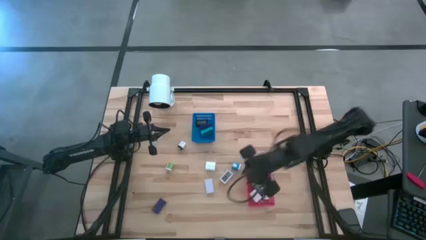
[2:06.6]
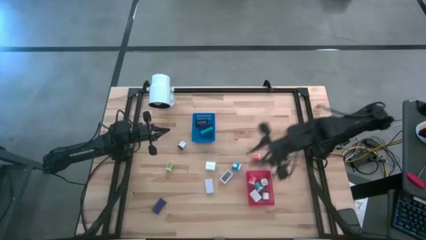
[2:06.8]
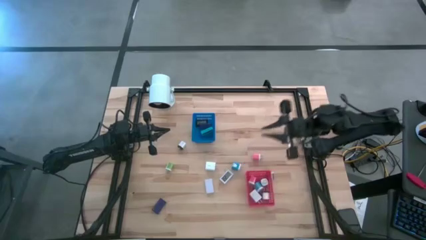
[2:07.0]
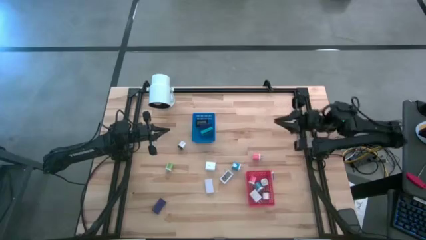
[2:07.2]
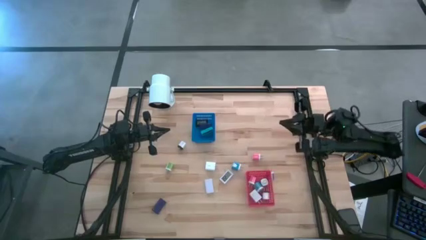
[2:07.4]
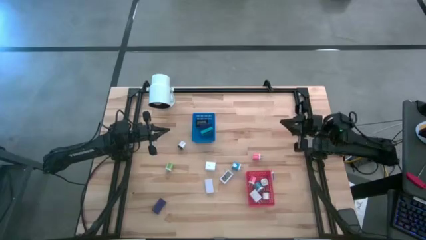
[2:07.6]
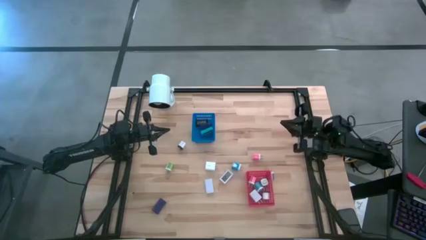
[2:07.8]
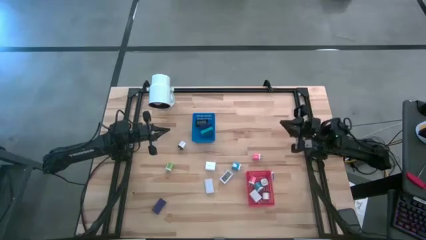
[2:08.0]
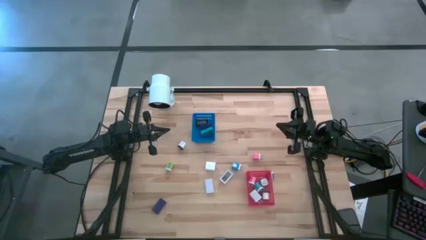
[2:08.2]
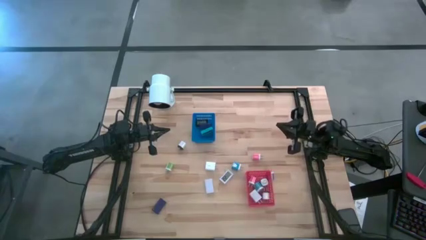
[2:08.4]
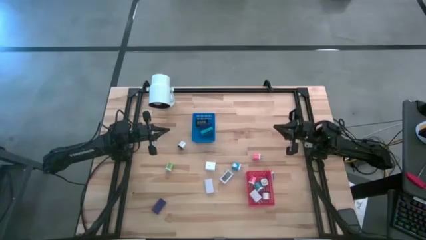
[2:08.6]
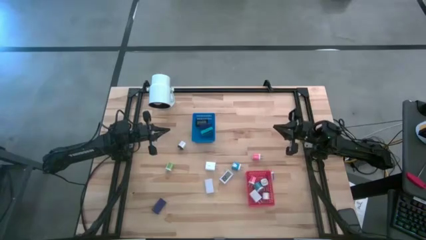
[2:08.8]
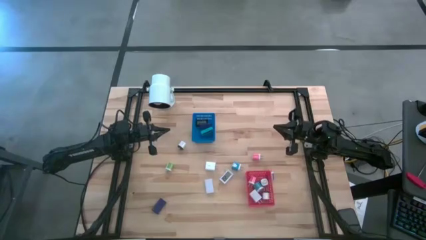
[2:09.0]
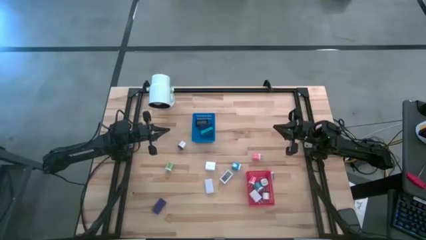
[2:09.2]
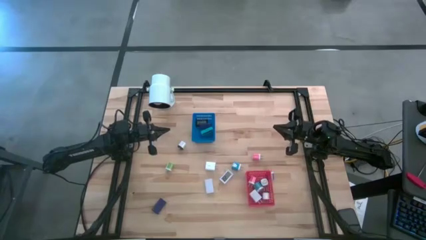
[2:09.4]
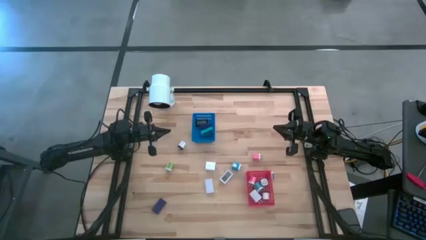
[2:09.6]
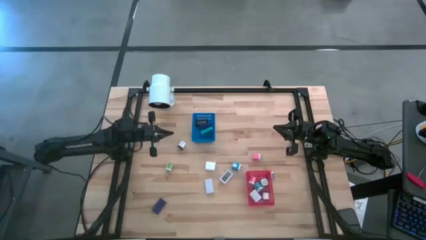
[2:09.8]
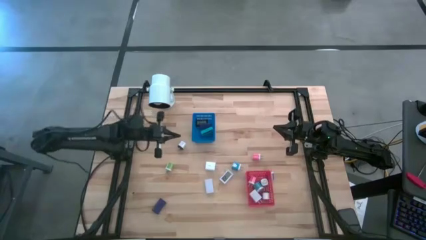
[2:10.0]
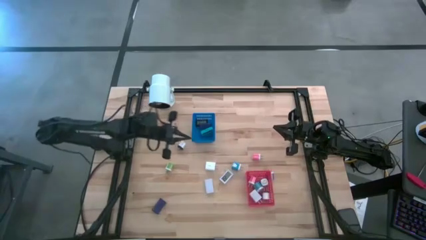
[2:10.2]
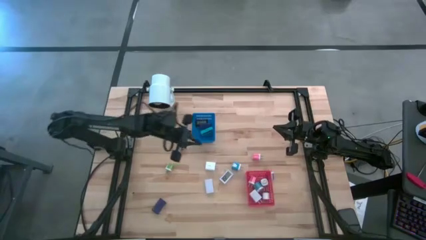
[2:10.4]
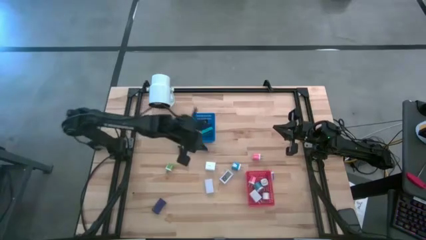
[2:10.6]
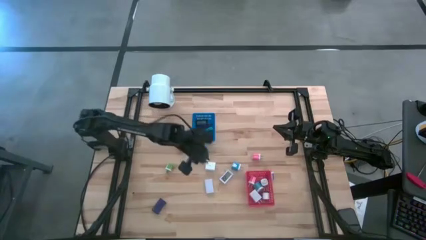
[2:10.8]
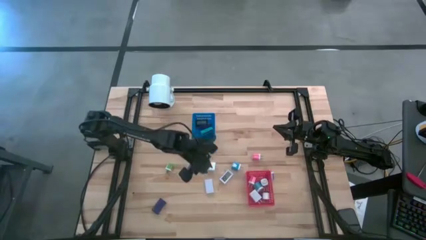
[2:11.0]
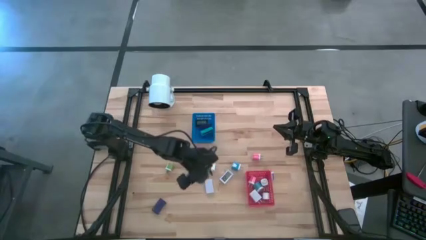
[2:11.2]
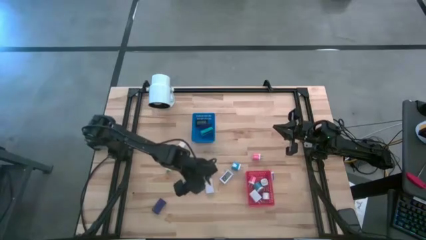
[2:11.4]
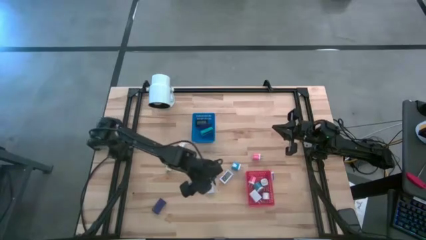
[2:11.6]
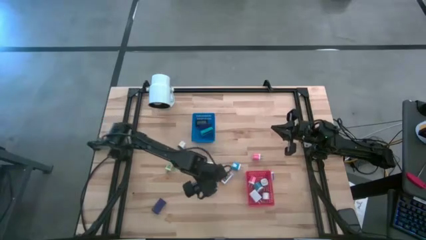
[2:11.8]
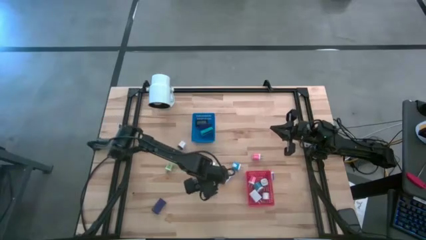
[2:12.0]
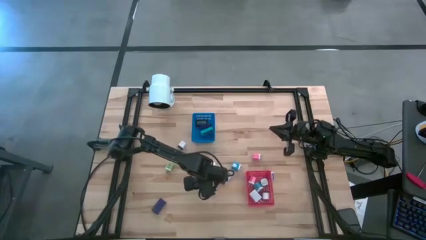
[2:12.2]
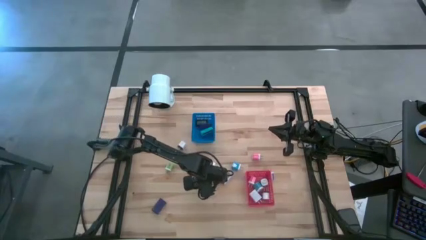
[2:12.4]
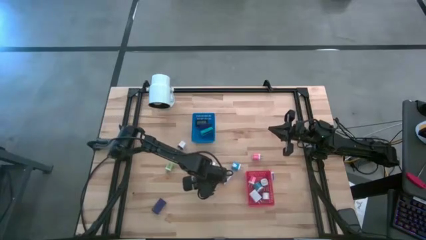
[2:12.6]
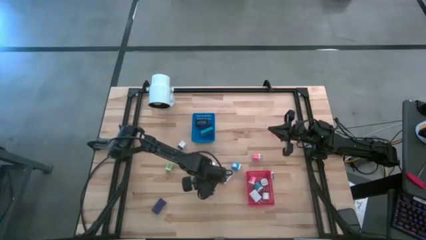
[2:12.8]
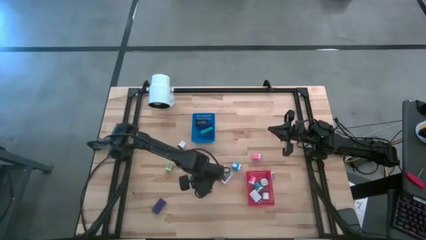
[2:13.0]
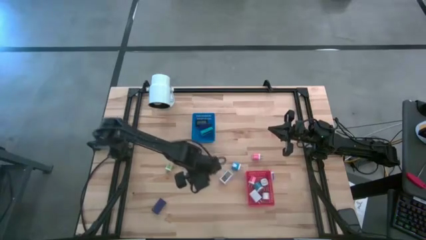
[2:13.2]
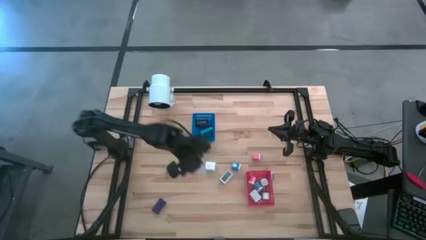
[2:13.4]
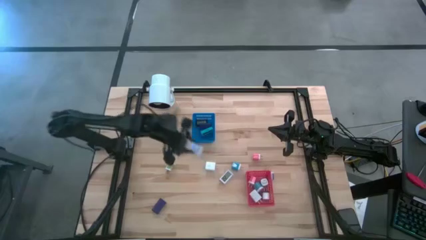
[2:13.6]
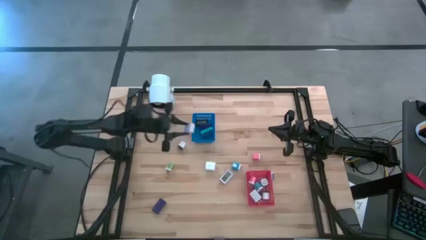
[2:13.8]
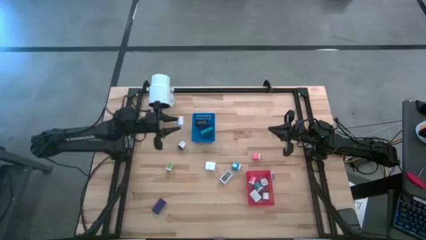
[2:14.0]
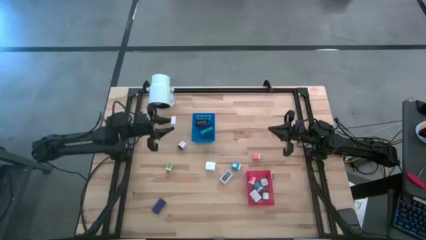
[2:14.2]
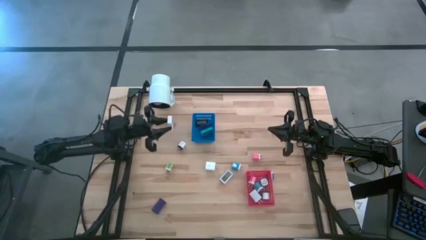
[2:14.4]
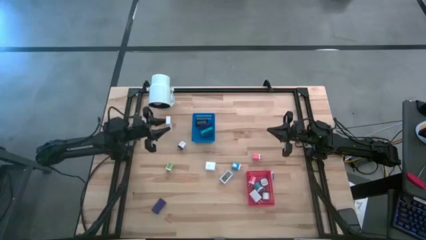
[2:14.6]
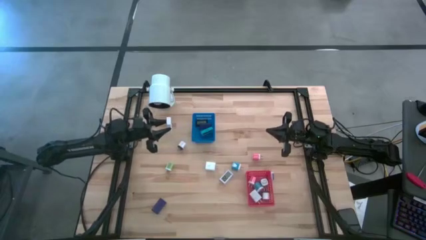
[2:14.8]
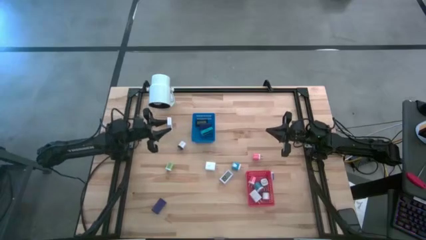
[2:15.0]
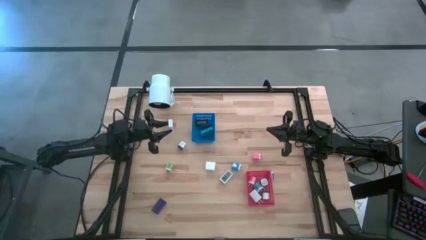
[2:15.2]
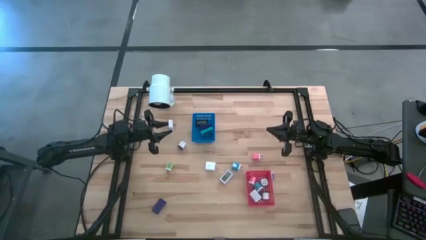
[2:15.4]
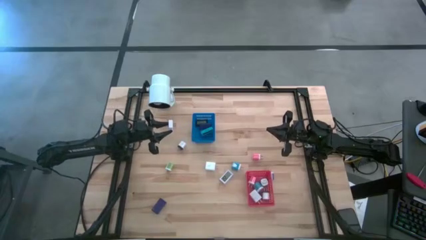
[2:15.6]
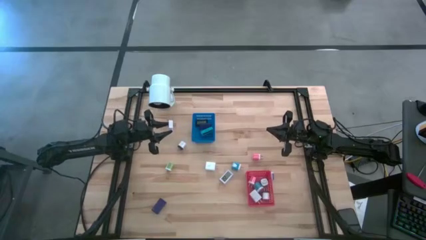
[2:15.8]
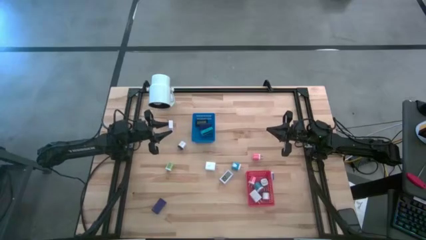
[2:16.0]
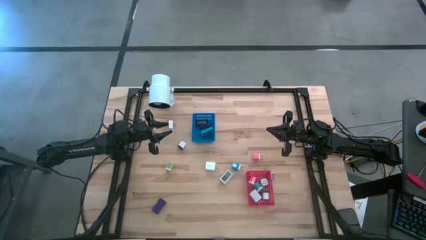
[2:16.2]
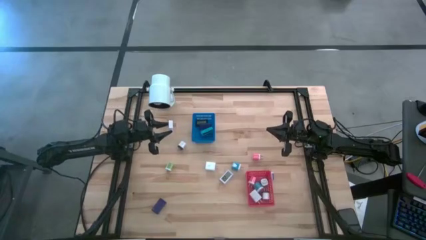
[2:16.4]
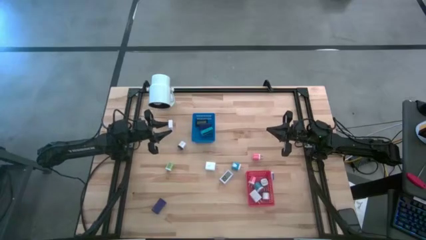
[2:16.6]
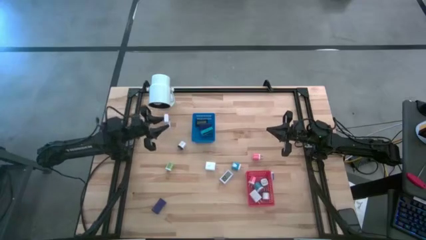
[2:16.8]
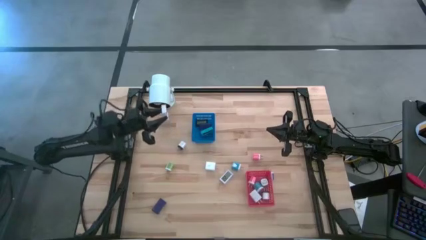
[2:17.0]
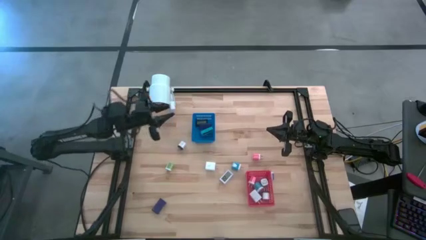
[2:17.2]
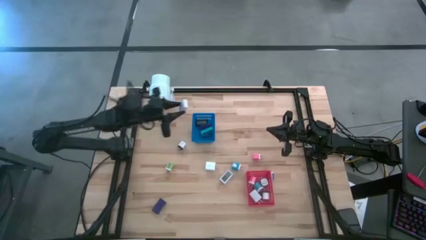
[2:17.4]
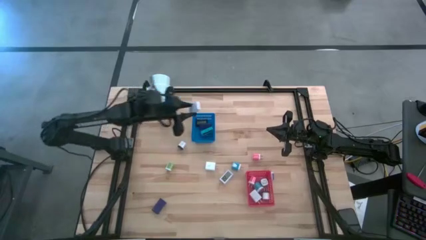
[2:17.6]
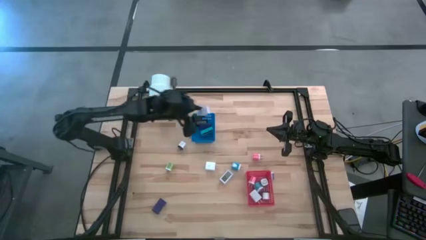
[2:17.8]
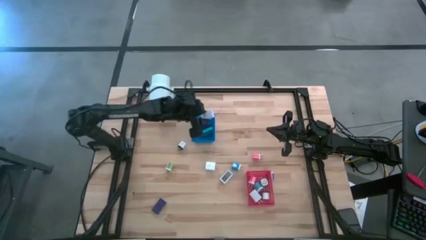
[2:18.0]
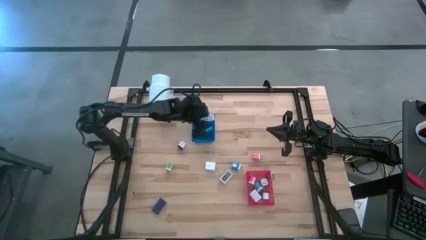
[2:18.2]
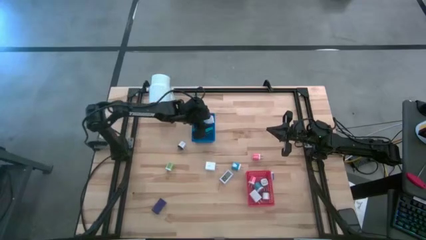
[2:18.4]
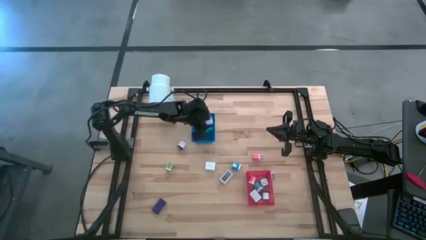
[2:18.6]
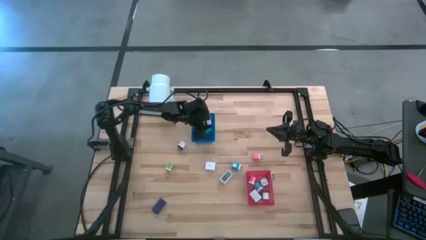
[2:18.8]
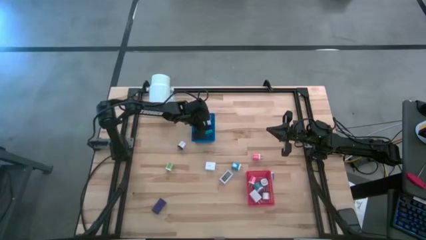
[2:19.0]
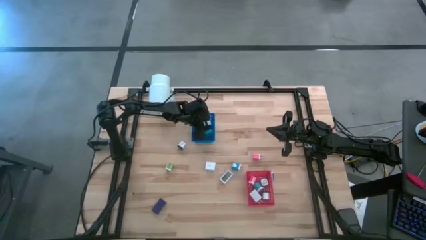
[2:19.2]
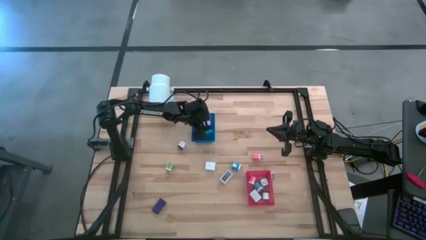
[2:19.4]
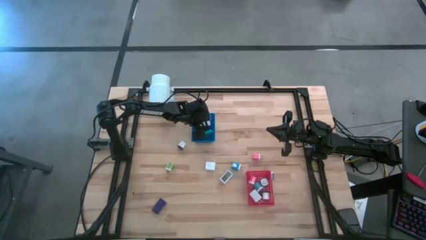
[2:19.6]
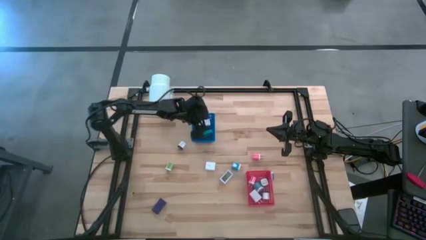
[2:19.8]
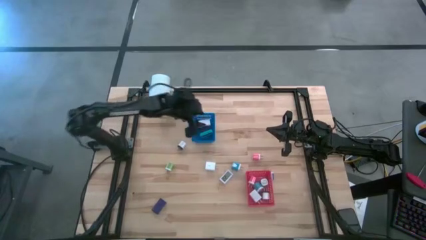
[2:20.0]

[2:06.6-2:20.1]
Task: Pick & Place Office items
Put the left white digital clock into the blue bin

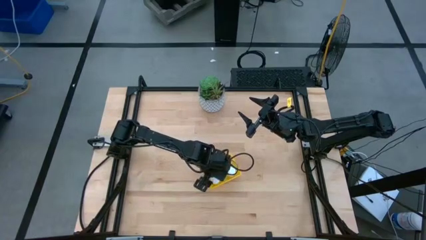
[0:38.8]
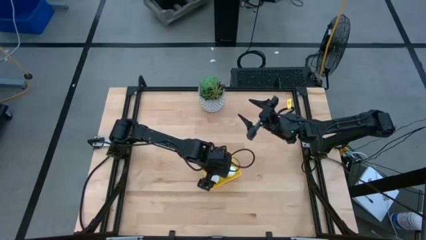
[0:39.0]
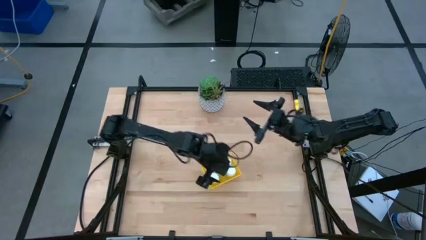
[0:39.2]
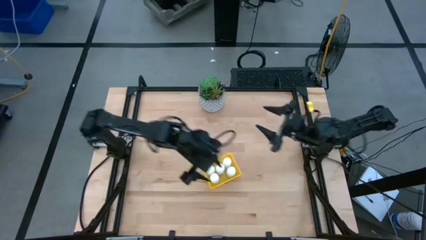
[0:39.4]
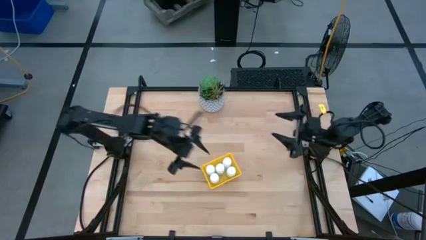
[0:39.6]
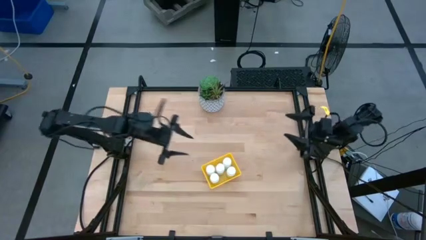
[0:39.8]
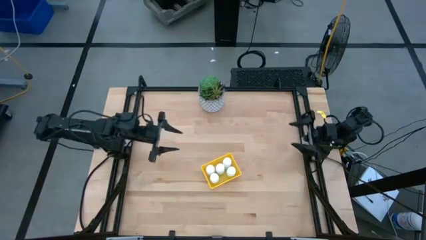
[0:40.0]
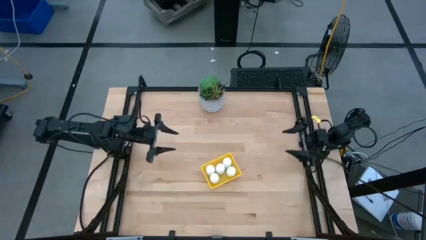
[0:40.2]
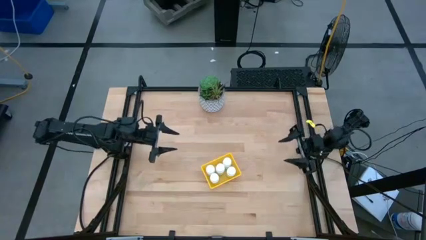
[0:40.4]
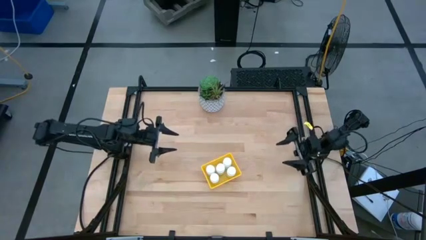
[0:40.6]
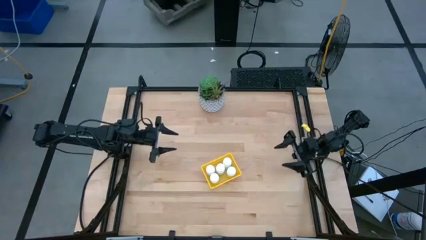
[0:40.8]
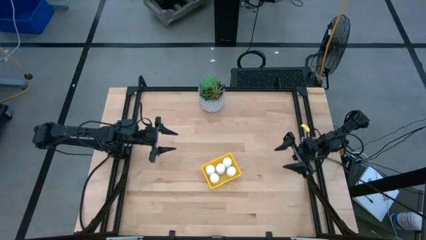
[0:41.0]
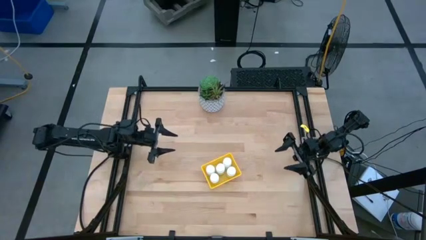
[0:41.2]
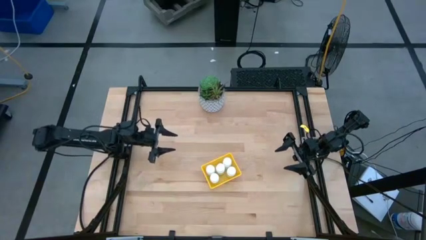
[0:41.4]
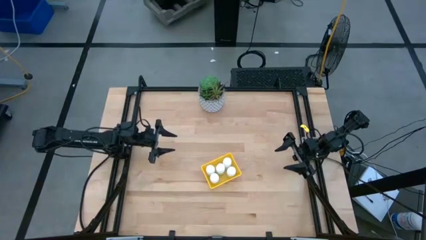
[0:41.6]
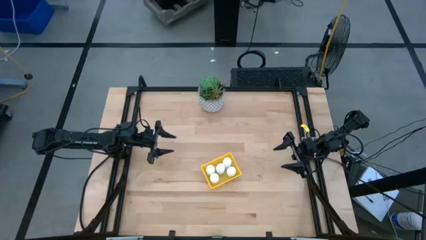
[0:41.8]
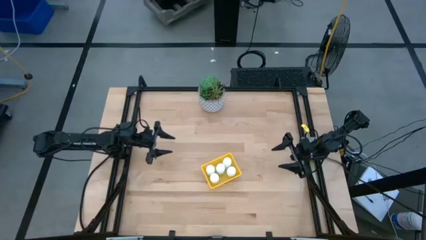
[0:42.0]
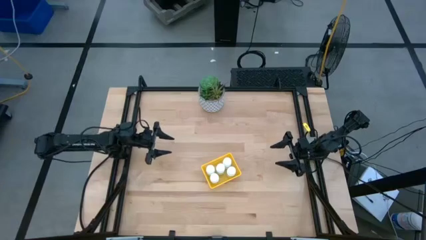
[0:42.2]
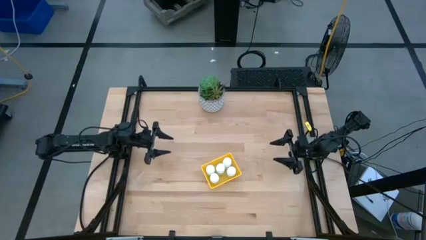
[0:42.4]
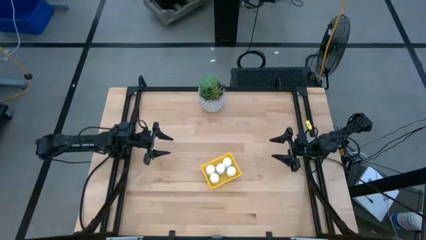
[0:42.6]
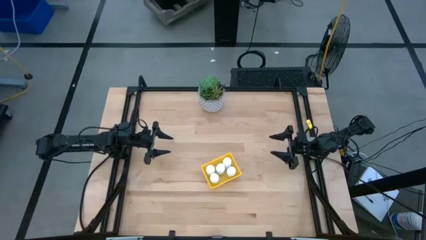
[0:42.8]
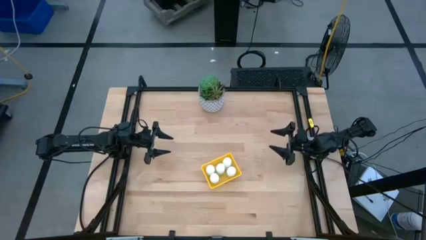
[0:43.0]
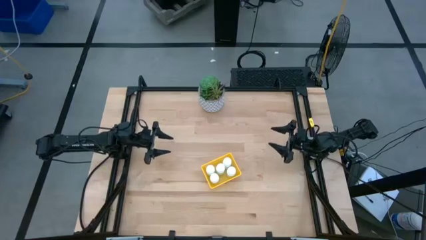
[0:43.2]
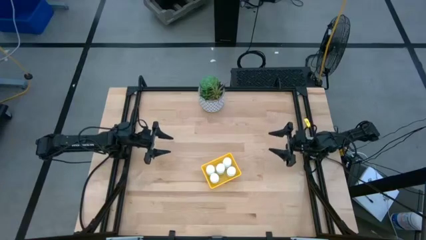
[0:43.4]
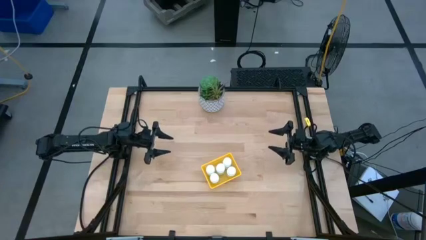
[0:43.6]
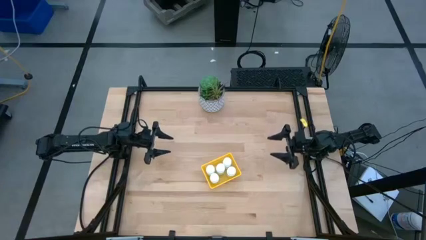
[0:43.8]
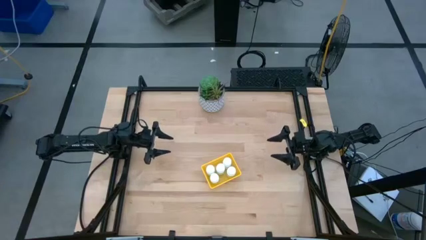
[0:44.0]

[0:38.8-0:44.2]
Task: Pick and place pill bottles into a basket
Return to Home Position
